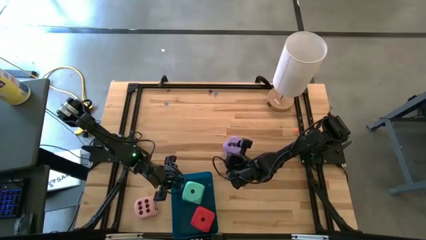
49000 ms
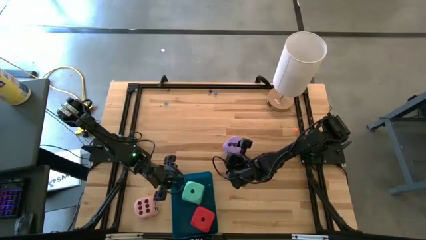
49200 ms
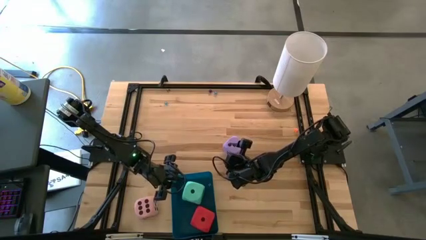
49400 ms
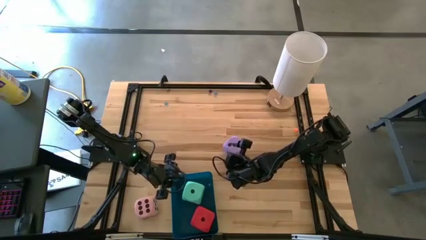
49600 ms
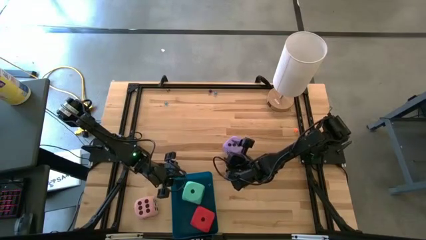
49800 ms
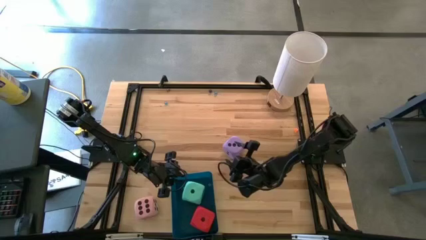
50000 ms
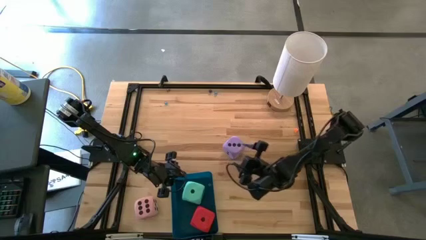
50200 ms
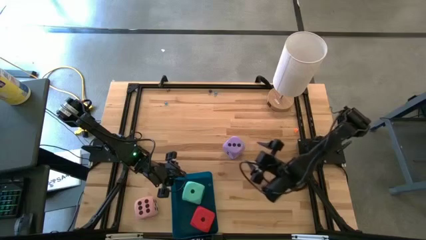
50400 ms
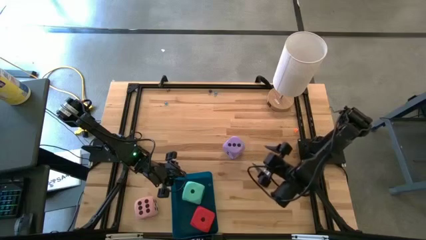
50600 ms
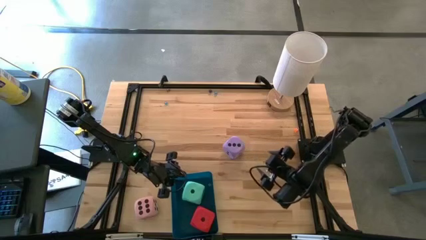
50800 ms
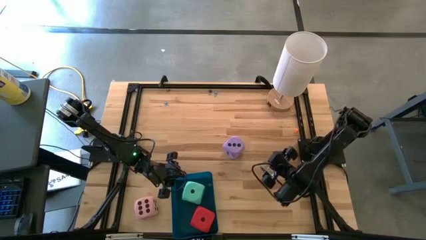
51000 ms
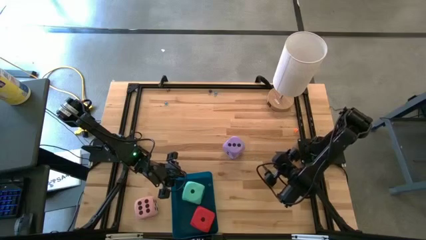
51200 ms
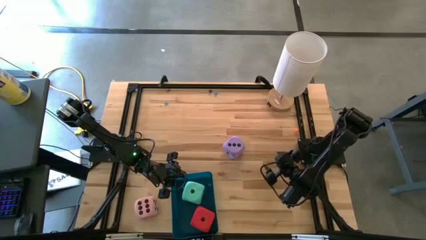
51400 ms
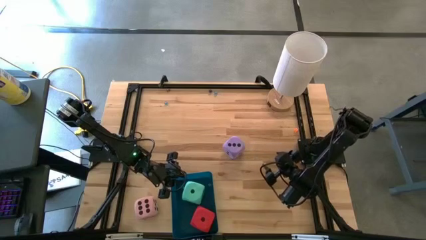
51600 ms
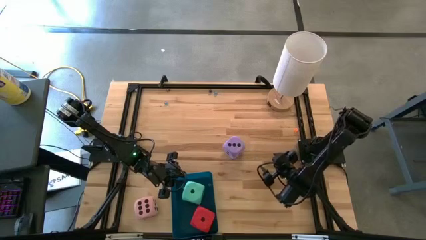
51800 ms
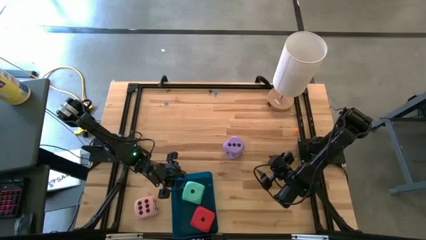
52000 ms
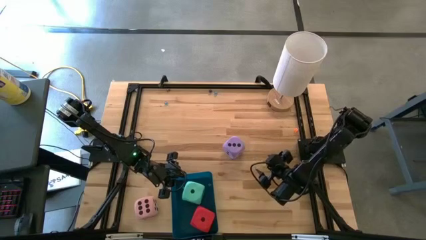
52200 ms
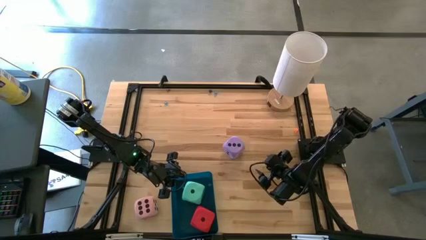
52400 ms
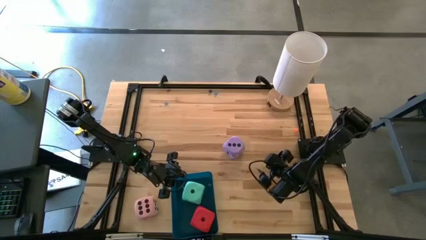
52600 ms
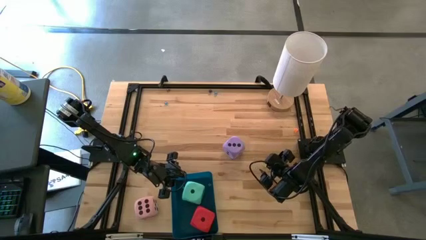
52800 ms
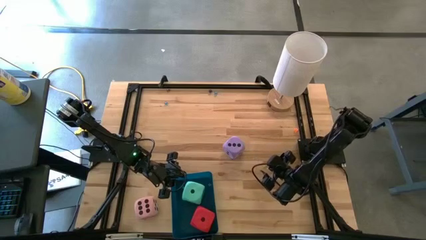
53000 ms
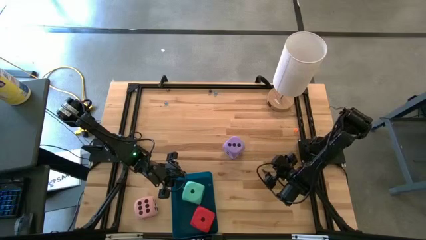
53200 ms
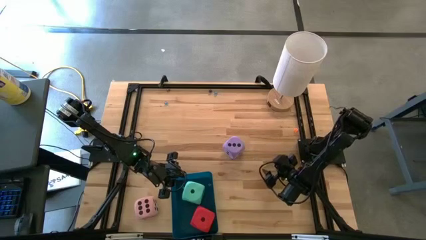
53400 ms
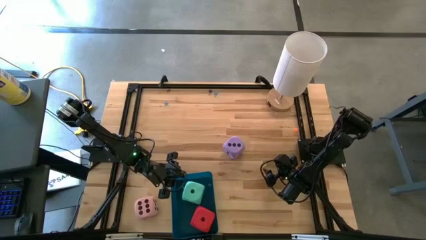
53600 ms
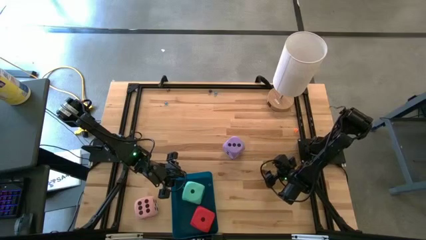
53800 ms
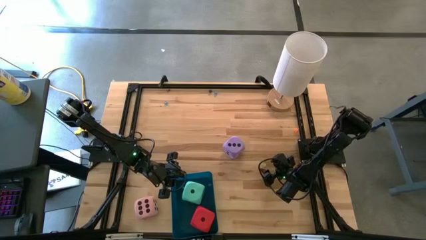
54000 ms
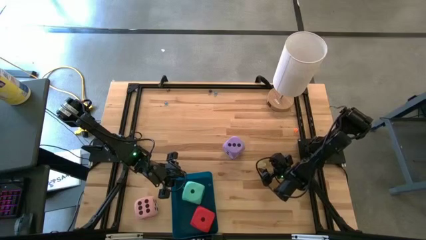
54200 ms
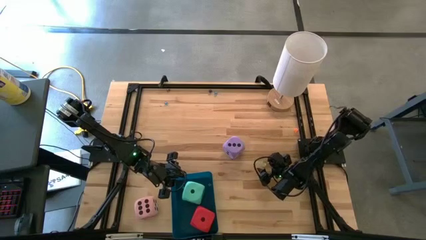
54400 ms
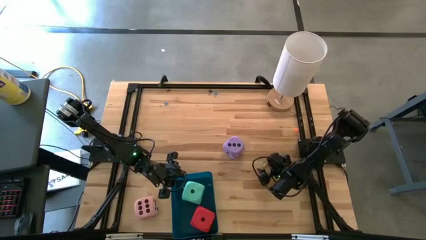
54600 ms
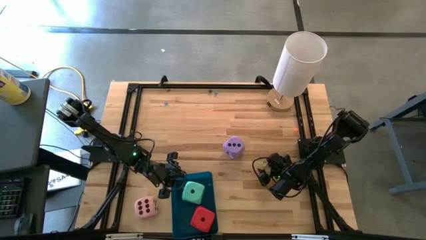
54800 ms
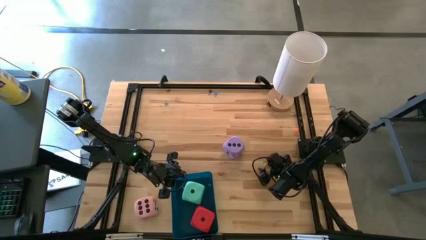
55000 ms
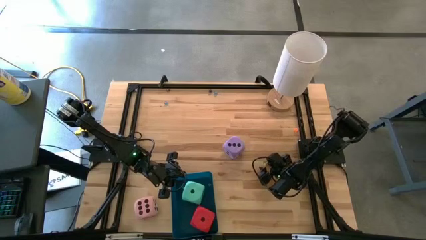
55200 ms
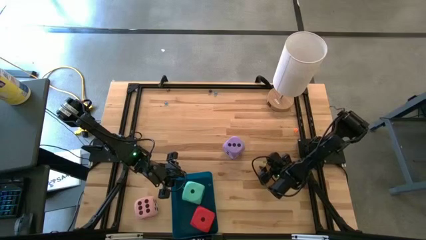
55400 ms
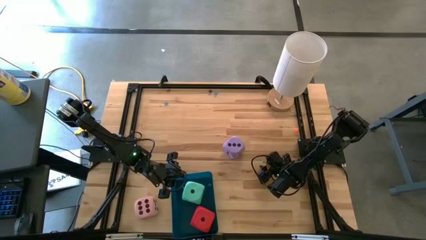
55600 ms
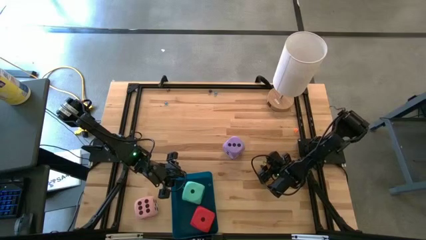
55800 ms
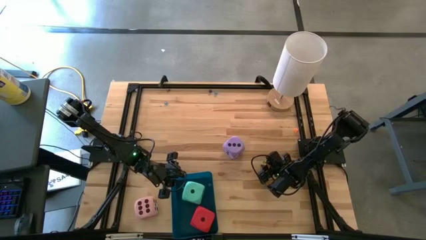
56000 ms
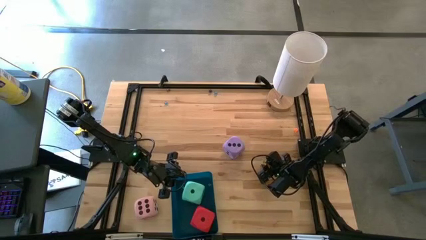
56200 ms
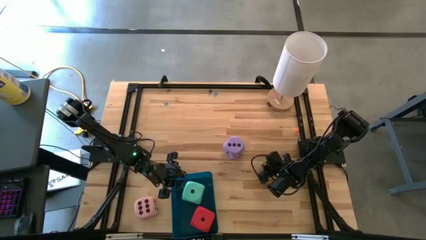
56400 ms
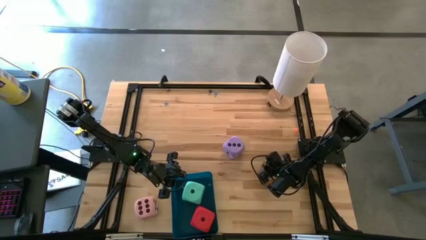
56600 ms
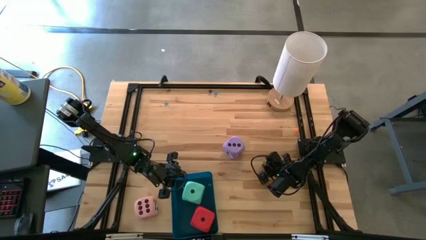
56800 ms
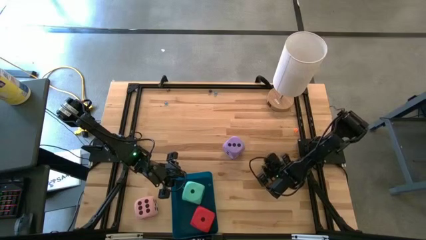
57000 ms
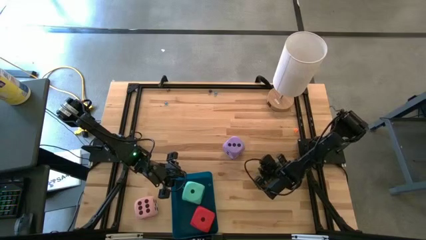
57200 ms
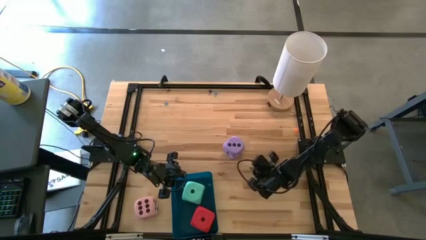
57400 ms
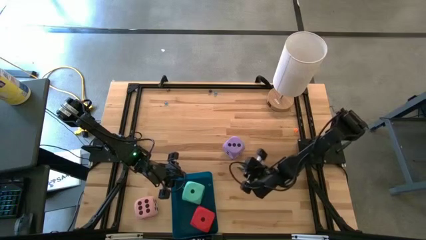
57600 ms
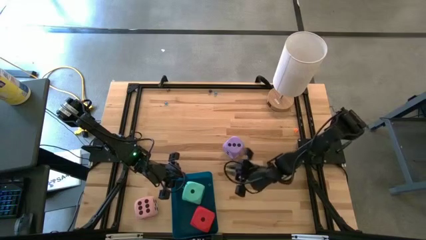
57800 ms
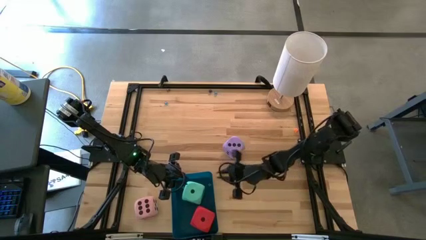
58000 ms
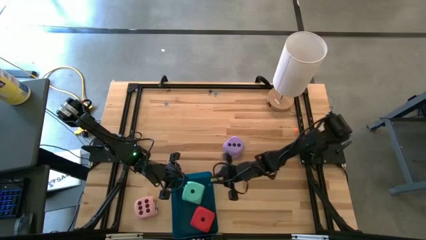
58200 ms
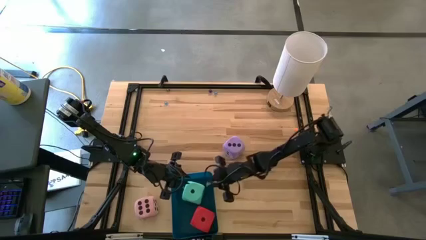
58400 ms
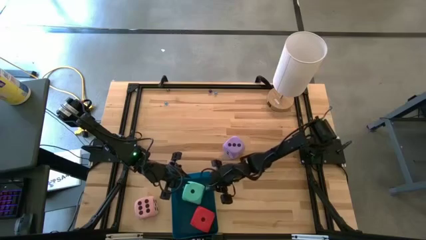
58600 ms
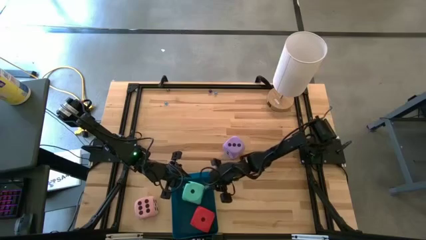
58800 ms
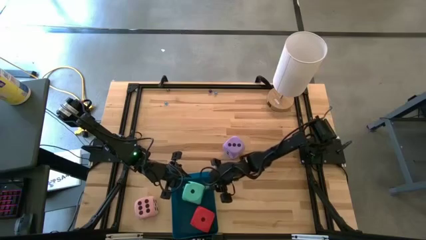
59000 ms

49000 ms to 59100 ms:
Task: Pick & Place Dice
Put the small green die into the blue bin
